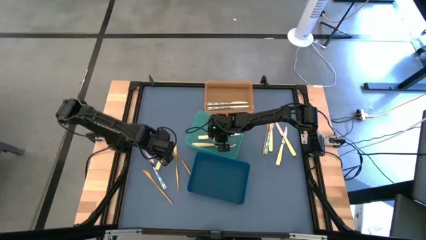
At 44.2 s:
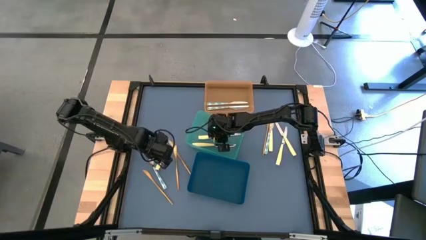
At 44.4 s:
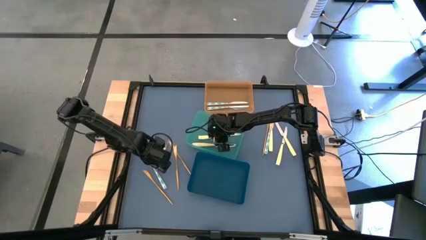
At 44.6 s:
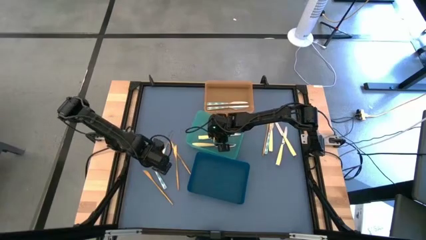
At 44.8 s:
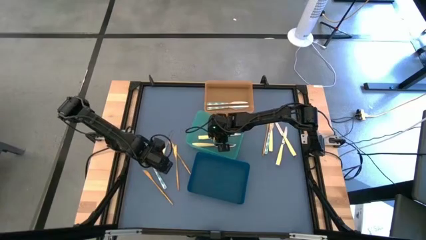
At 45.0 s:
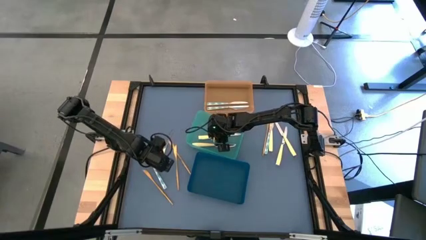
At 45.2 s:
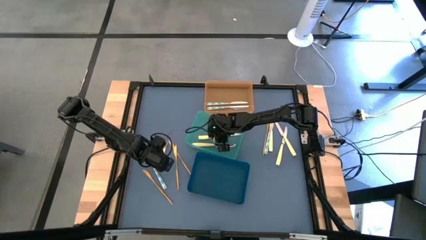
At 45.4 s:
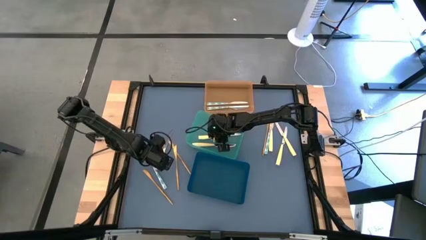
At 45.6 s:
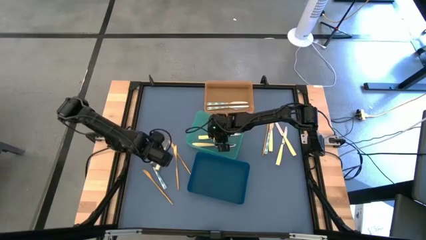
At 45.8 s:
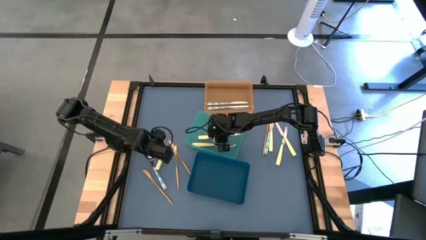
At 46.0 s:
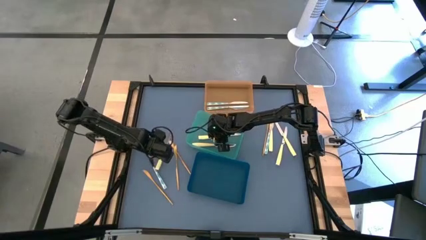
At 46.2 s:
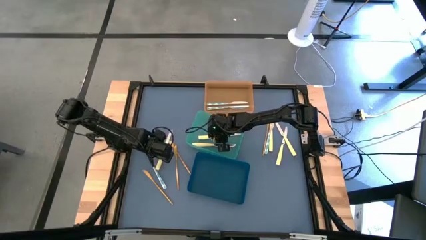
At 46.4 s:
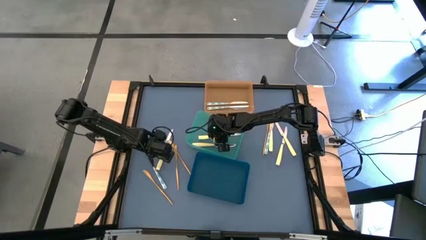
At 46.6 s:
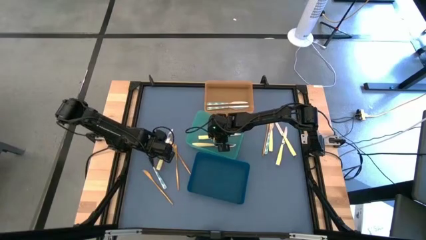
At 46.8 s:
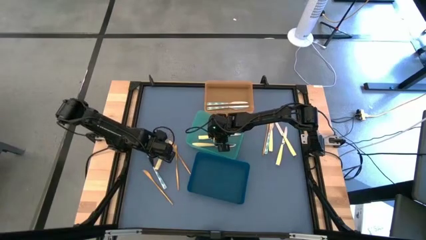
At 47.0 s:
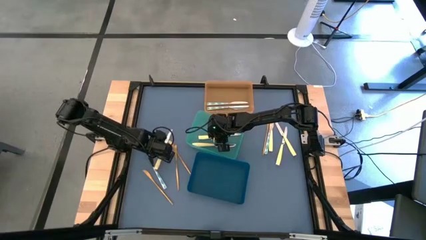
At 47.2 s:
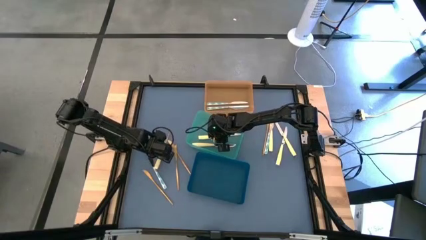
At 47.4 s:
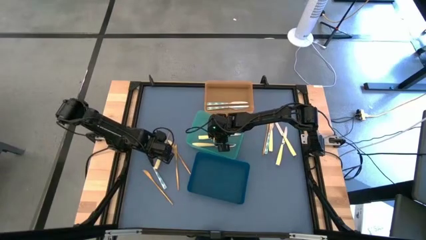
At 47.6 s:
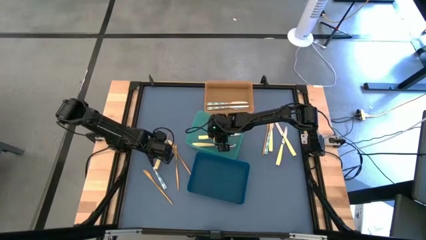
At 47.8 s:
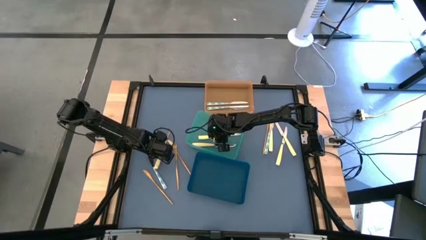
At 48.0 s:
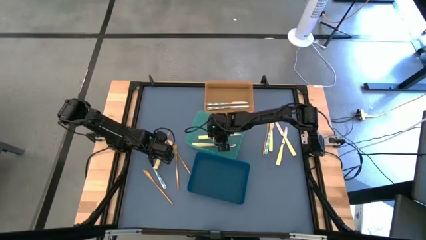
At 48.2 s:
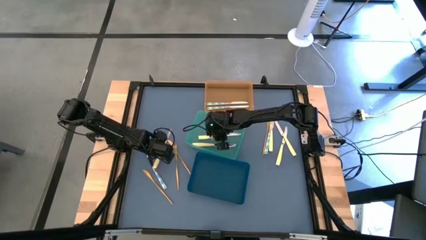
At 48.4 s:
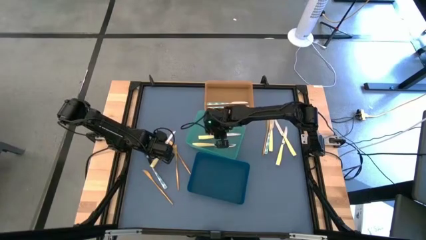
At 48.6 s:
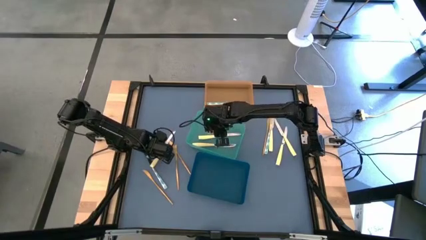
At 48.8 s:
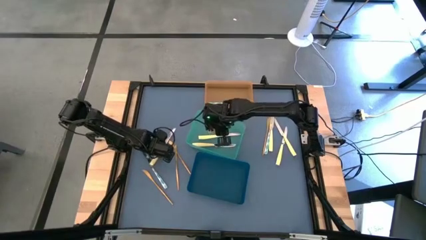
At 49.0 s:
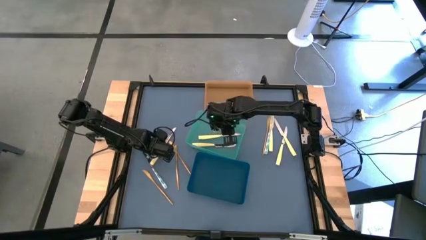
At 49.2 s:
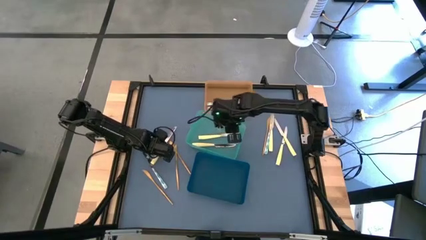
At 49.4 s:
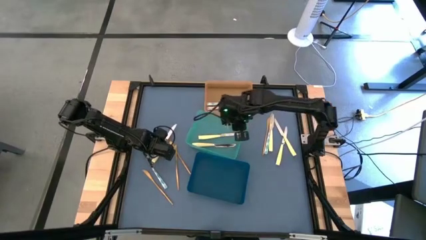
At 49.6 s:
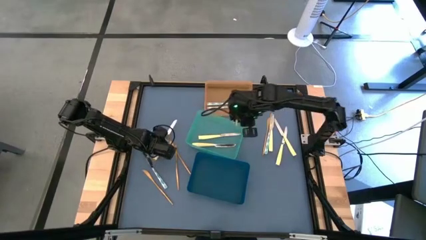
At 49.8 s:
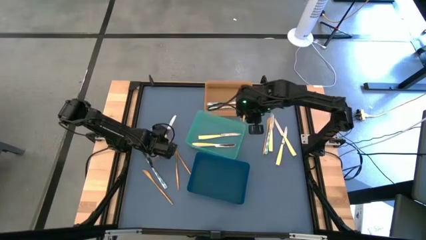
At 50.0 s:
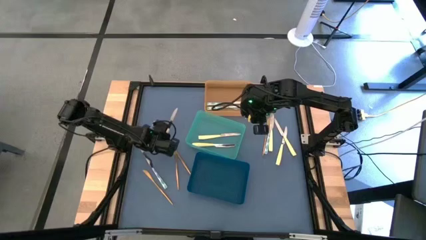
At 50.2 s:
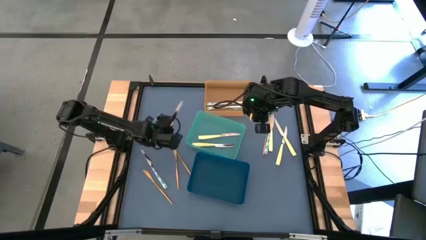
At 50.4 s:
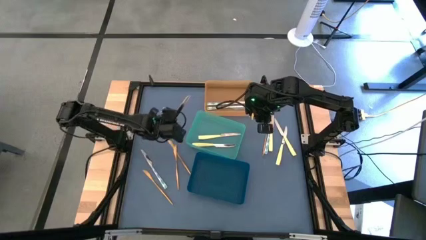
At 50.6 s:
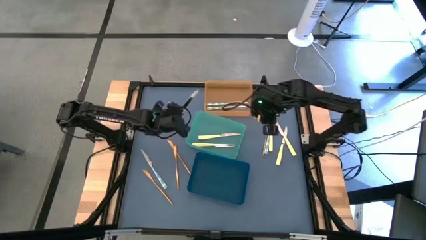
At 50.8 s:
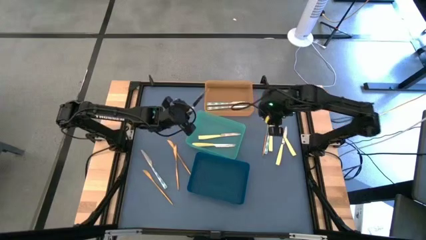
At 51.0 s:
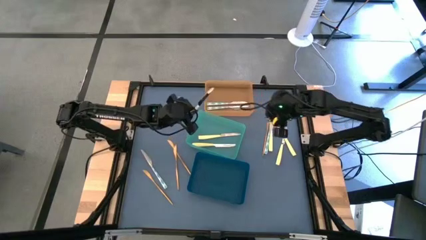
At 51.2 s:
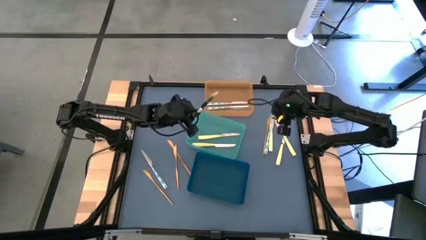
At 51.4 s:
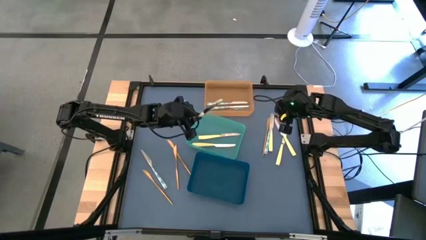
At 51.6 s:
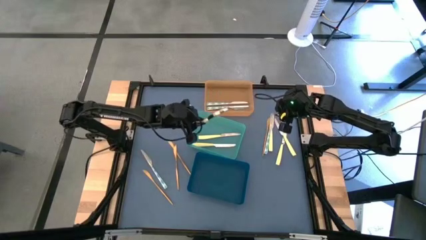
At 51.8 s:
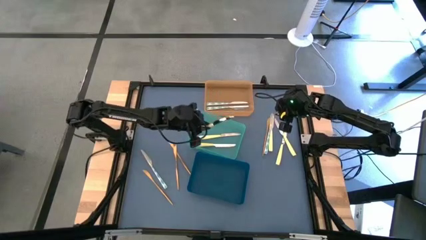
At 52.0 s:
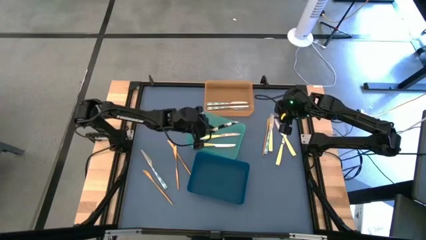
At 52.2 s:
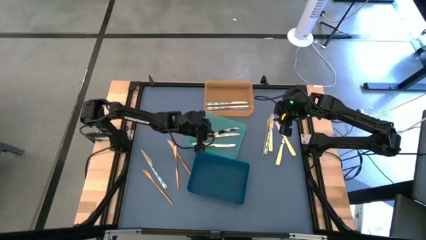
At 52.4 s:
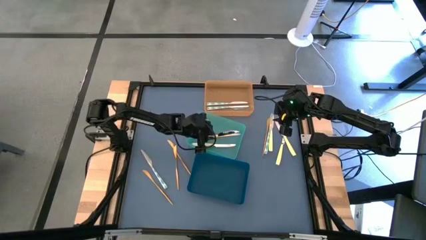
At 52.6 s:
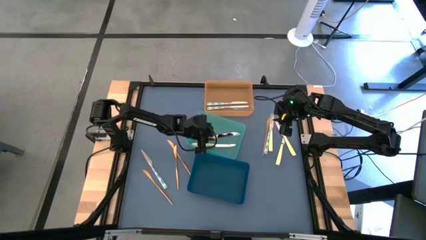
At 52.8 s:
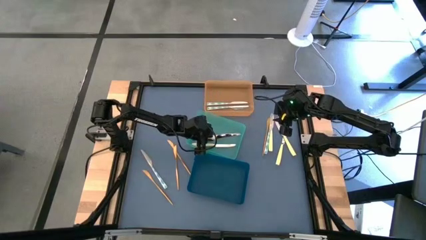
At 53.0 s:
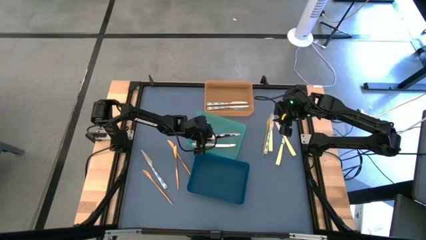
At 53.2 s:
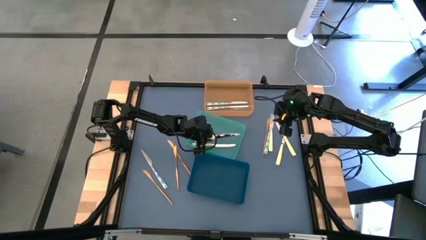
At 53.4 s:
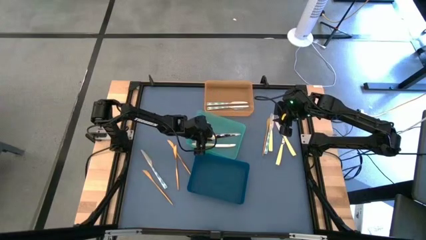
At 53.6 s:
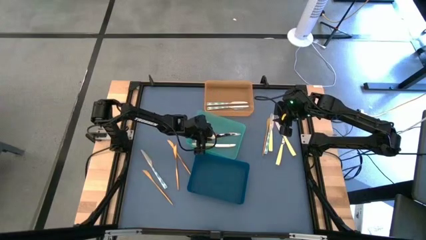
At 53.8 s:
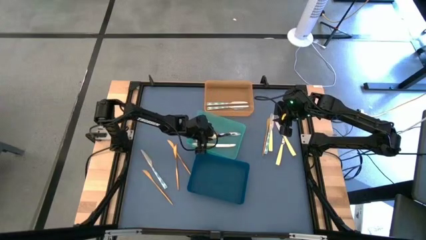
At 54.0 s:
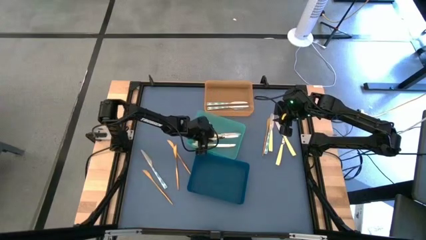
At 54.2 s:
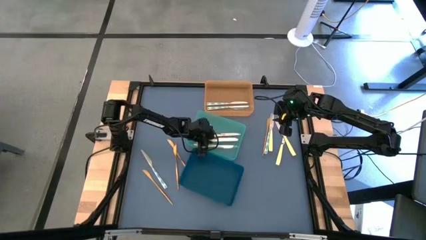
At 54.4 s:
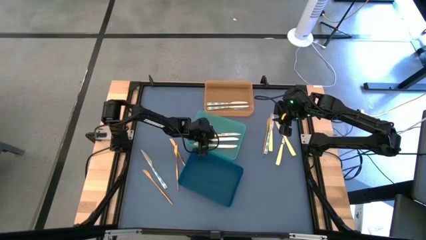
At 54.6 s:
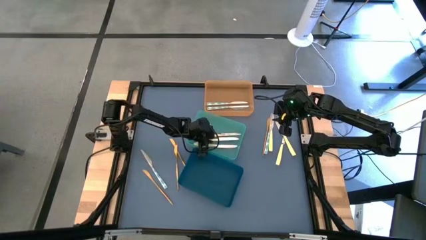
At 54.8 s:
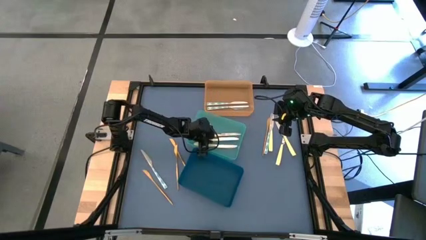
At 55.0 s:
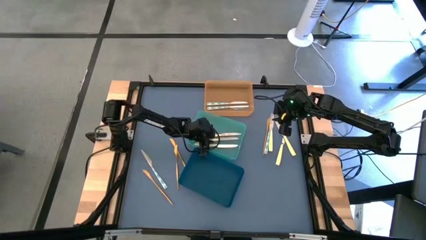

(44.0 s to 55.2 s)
Task: Sort silverware by color (type)
Put the yellow knife into the green bin
